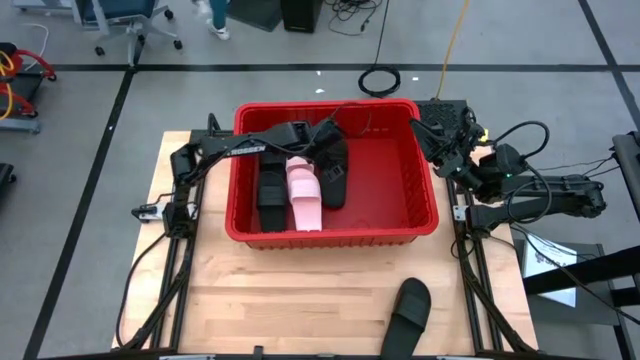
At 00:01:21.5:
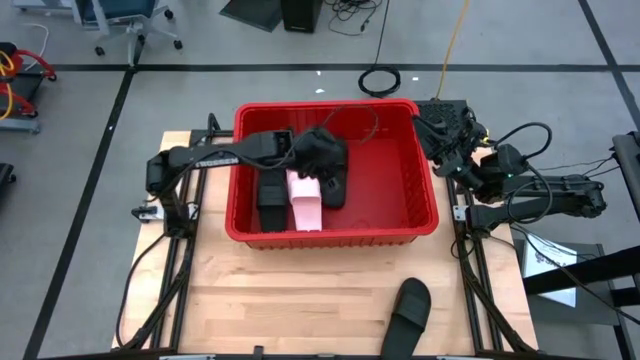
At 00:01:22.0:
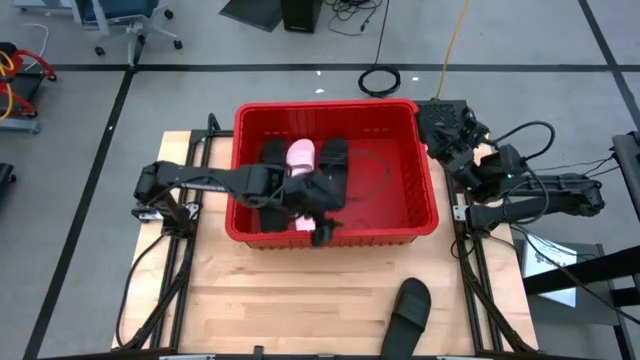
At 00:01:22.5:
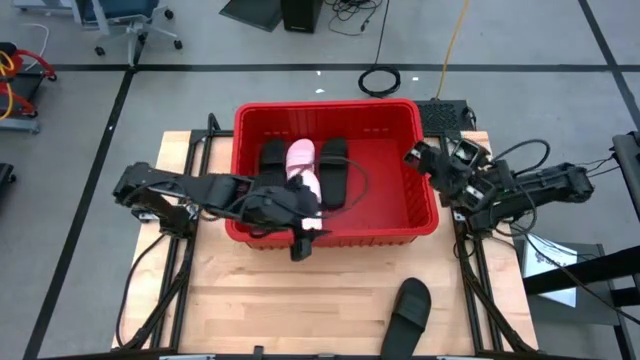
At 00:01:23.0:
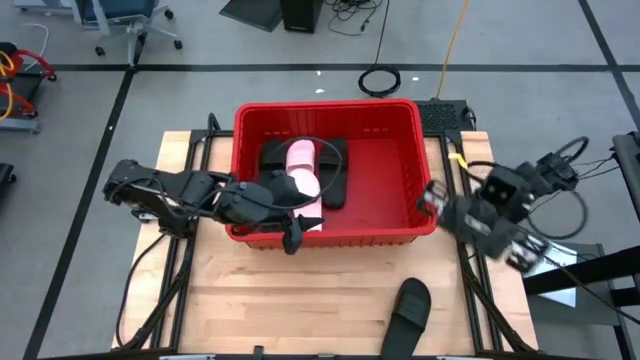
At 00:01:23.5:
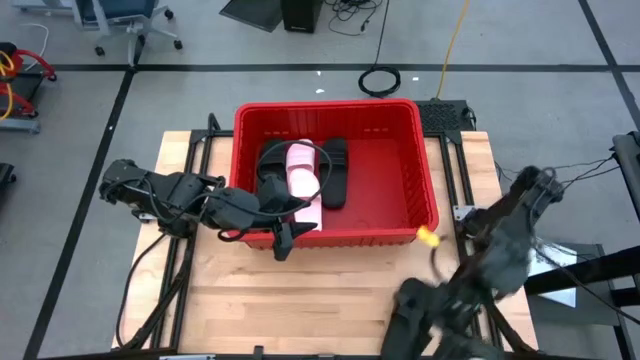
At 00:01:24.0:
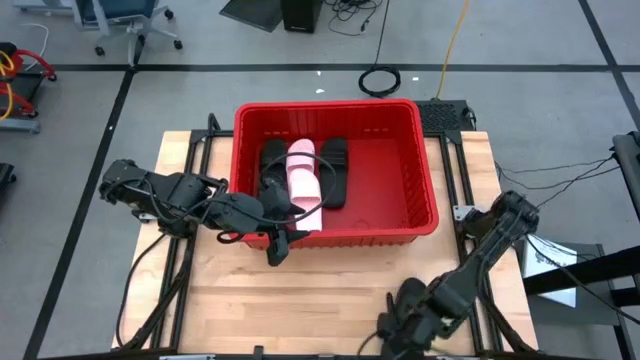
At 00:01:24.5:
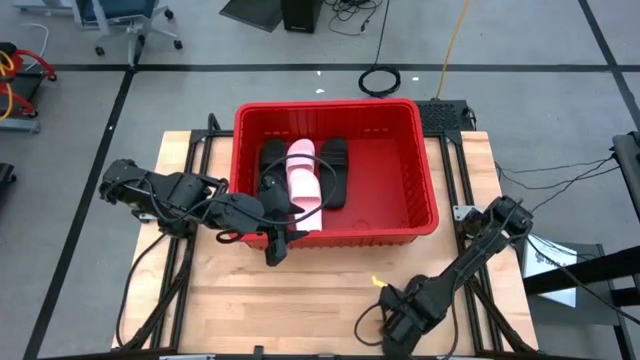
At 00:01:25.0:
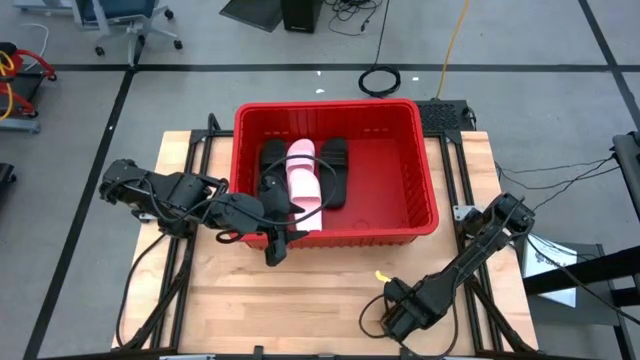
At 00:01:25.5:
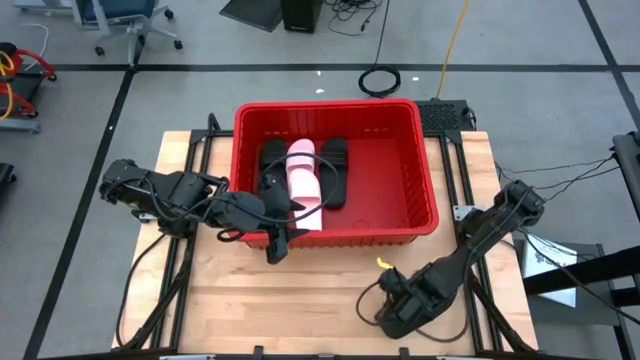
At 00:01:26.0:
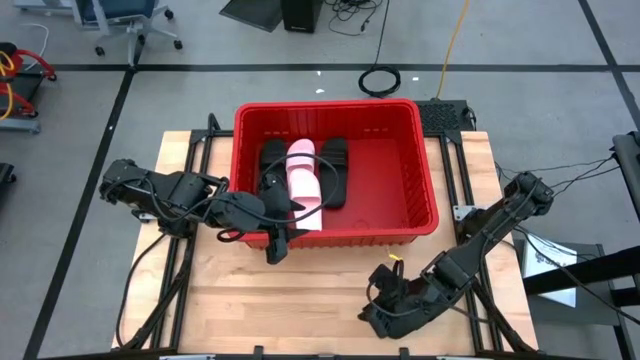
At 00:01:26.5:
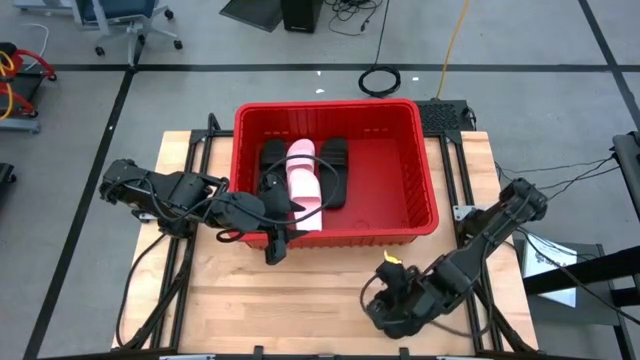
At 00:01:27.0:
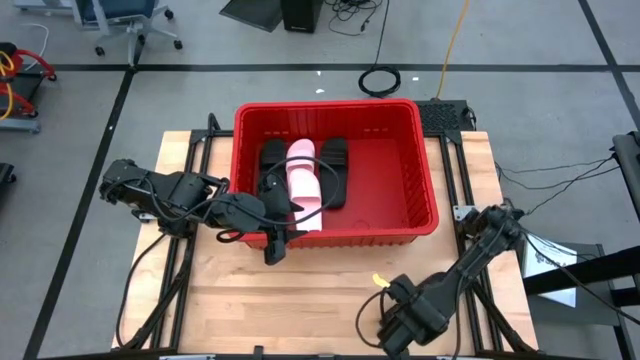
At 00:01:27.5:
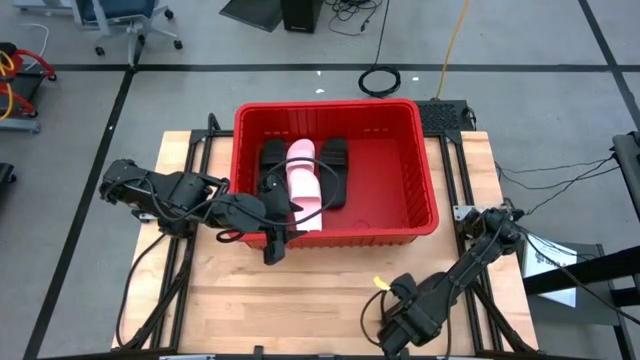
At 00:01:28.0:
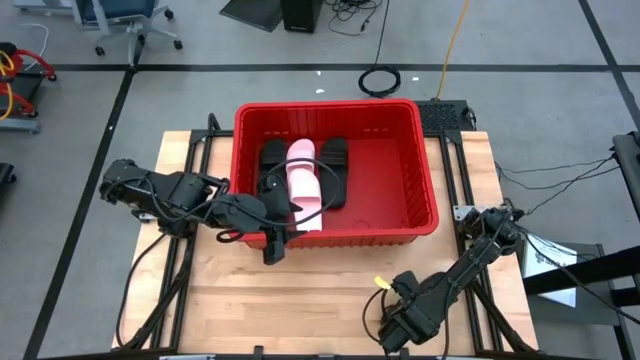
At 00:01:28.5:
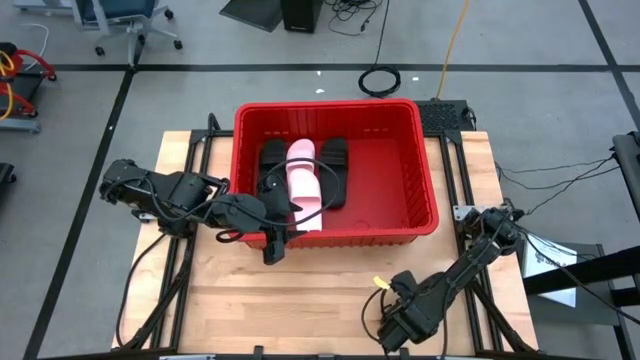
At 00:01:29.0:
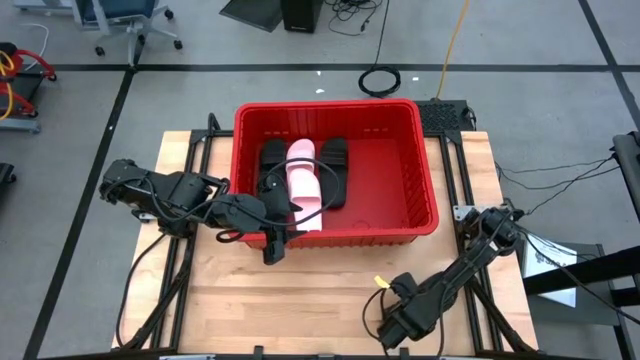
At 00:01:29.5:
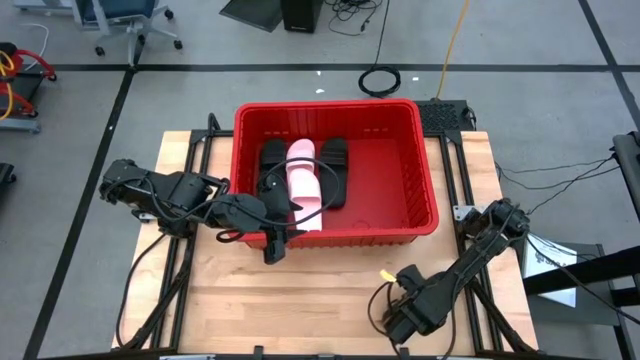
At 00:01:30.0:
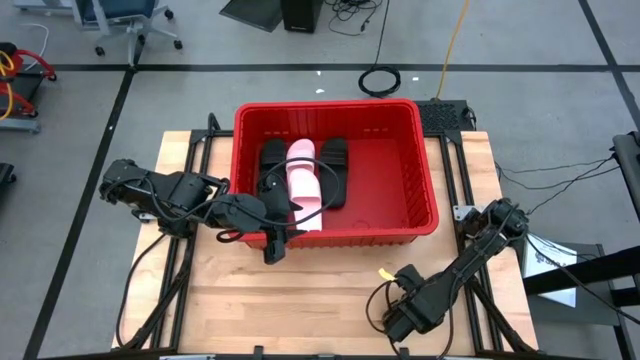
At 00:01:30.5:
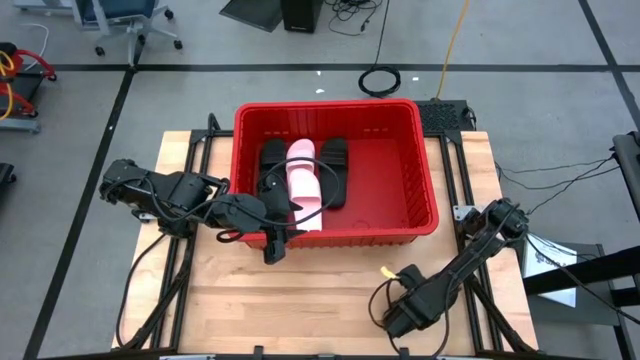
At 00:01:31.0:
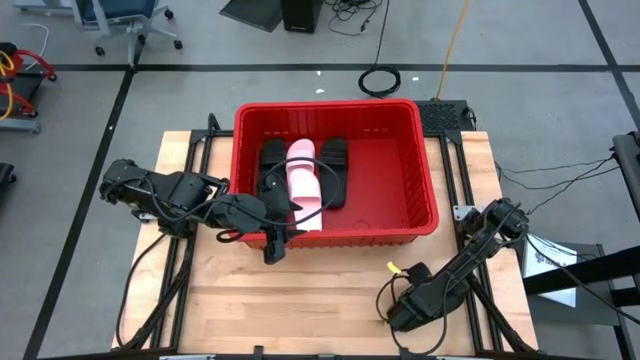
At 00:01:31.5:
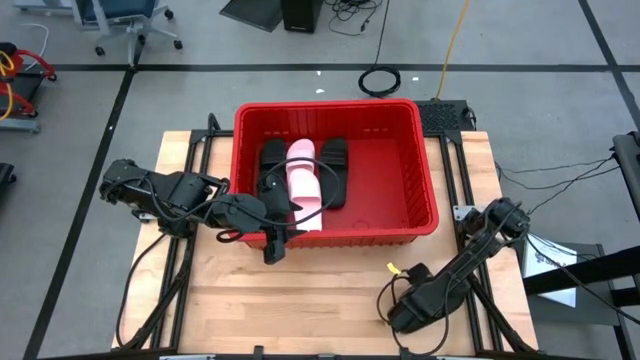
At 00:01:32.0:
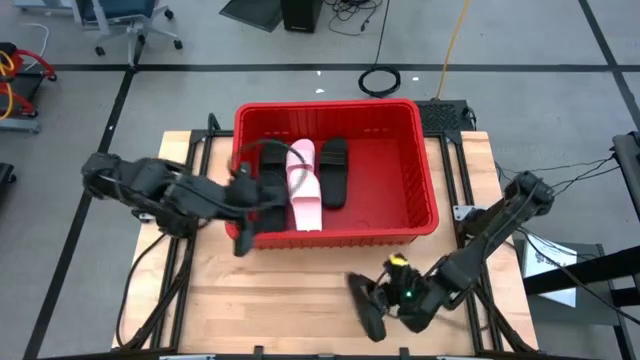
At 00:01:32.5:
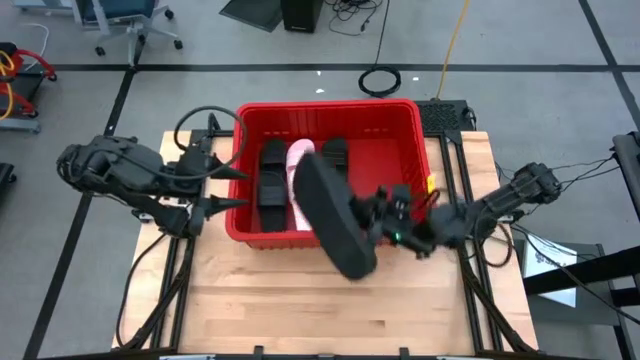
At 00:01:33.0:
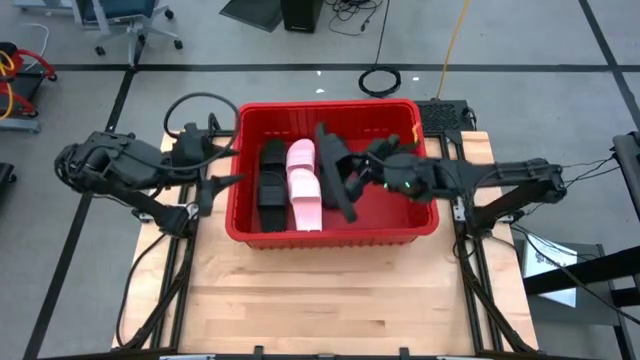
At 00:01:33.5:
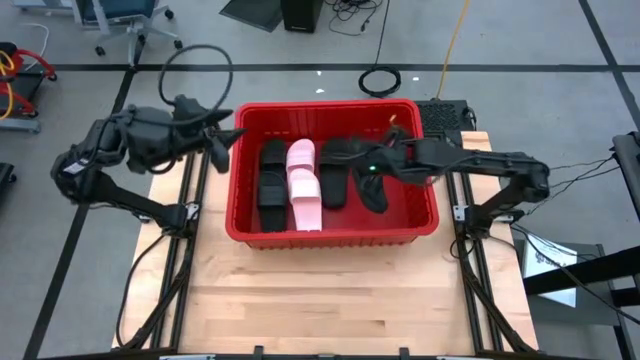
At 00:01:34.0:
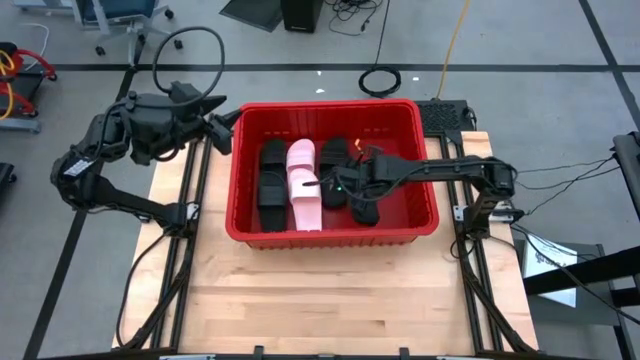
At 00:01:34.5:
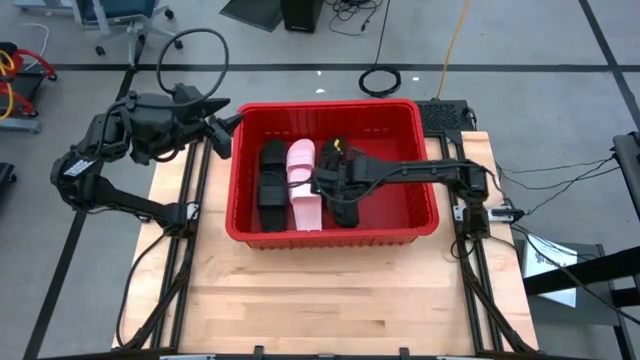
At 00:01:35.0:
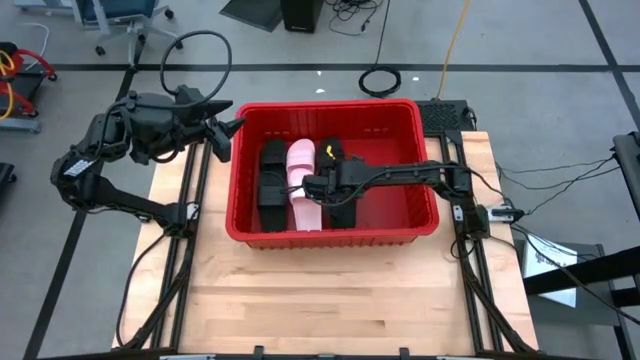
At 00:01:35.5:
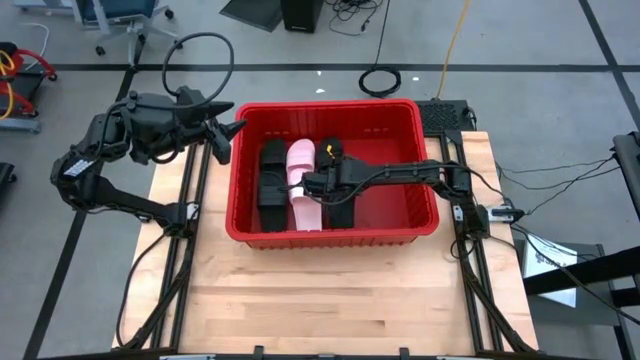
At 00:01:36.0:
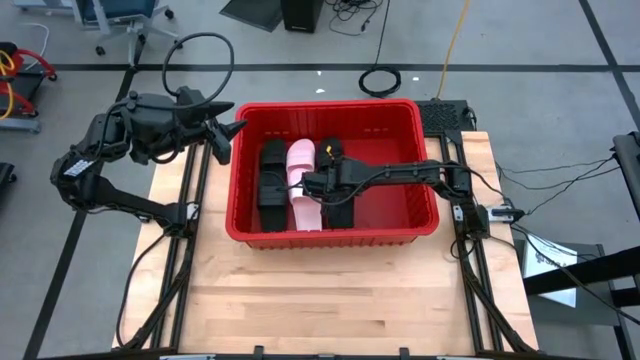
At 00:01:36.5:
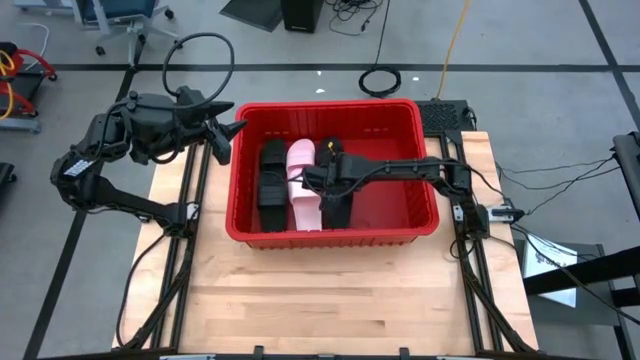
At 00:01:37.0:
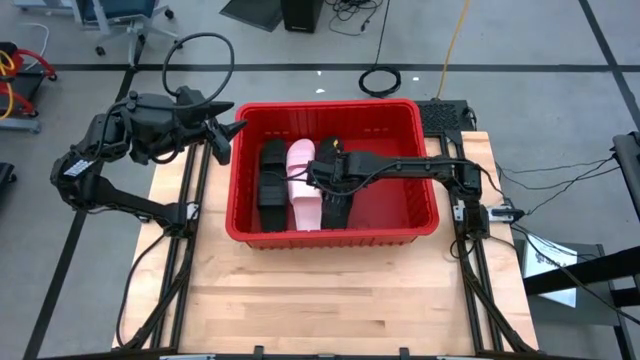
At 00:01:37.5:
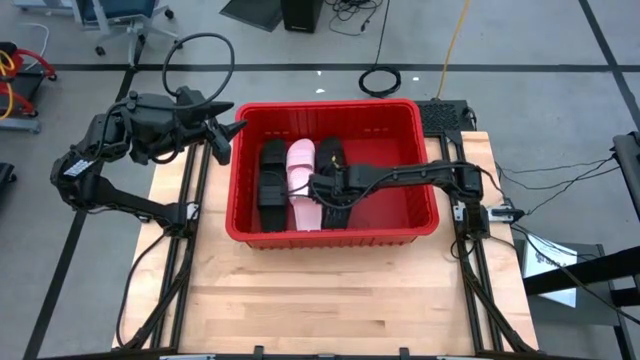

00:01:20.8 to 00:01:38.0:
Task: Pick and place slides into bin
Put the black slide into the red bin
